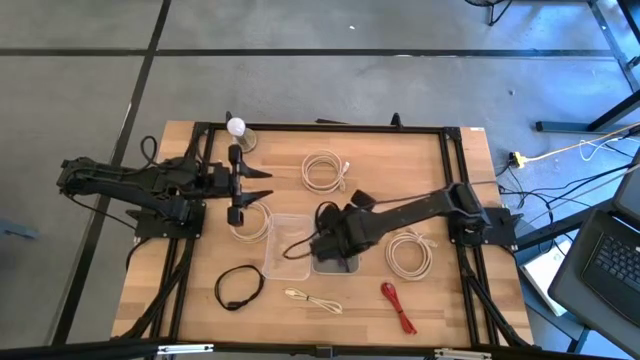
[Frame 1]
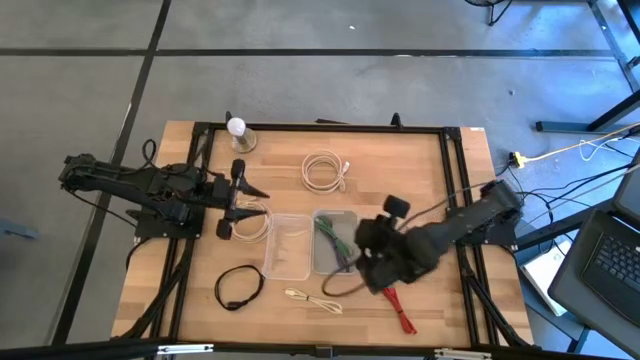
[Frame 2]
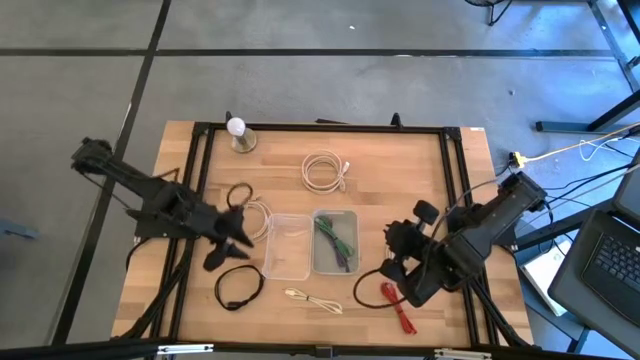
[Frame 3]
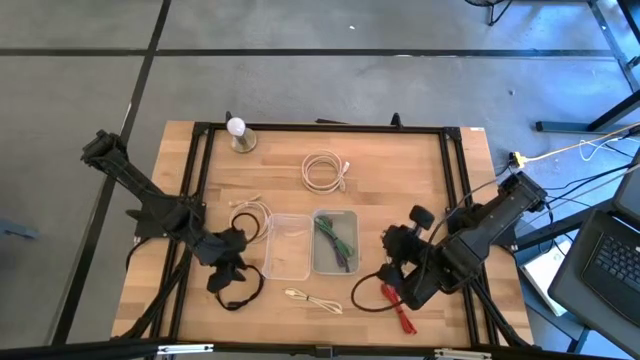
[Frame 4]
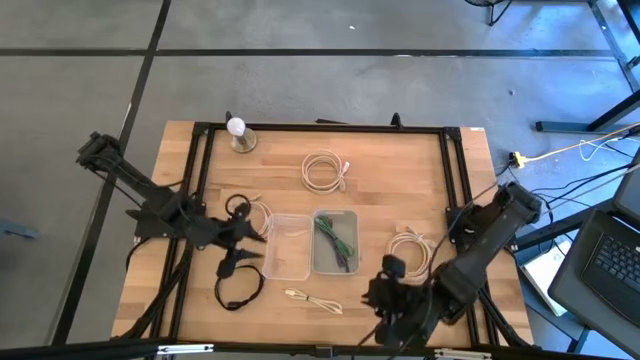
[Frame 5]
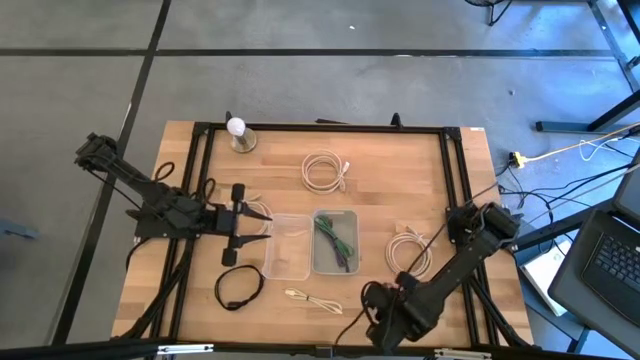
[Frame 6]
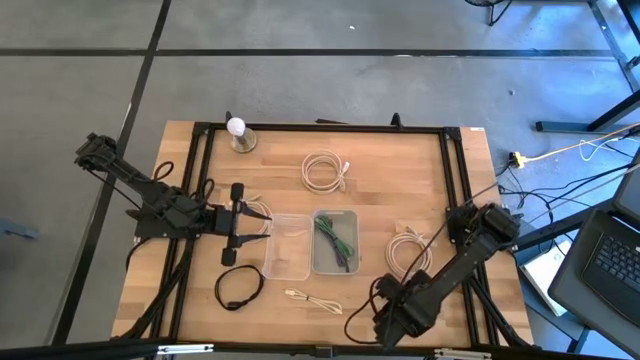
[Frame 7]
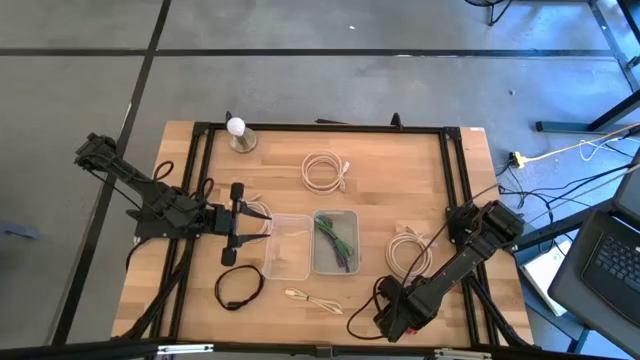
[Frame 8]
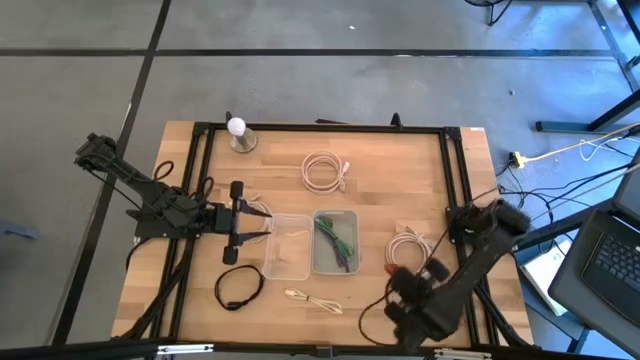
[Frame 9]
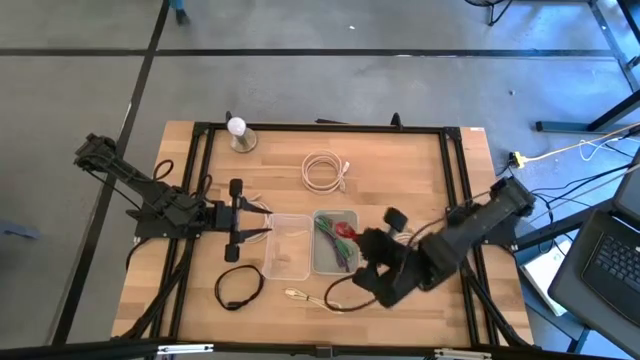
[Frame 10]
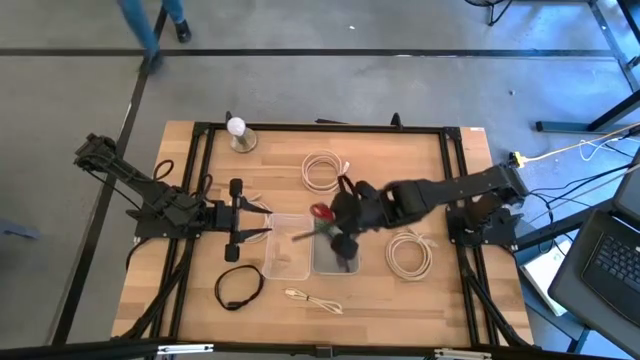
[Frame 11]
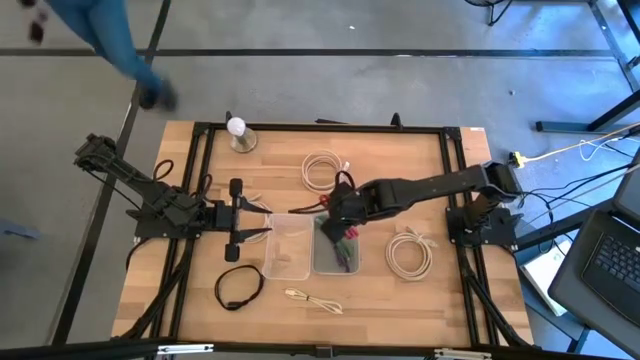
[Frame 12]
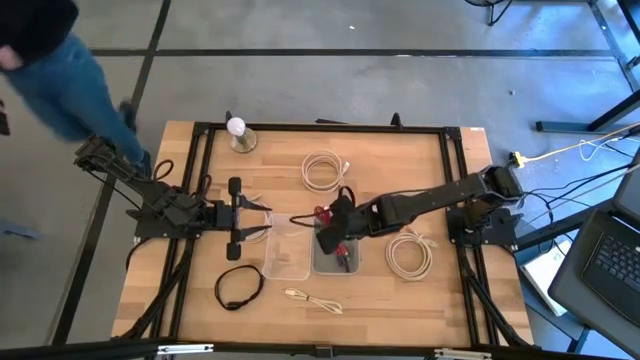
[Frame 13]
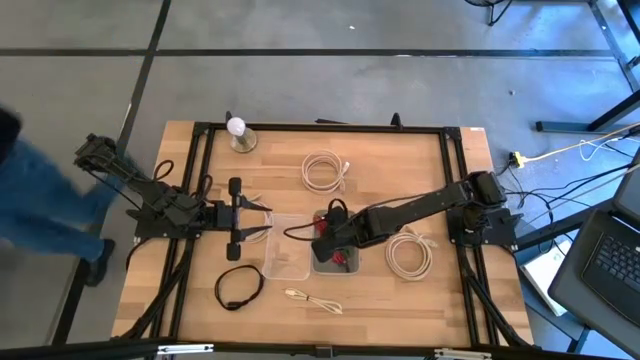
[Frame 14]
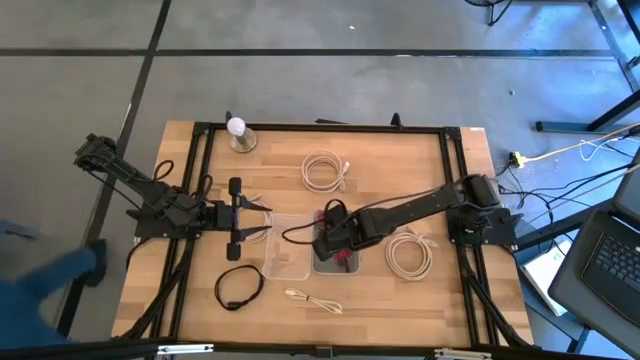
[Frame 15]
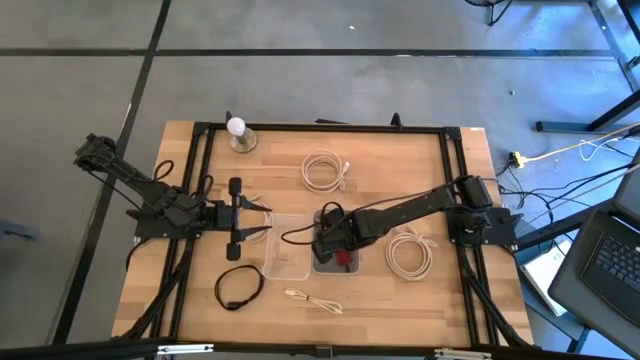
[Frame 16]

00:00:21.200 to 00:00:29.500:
Put the red charger cable into the gray bin

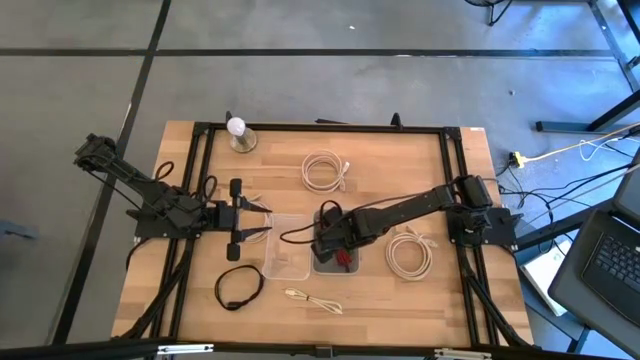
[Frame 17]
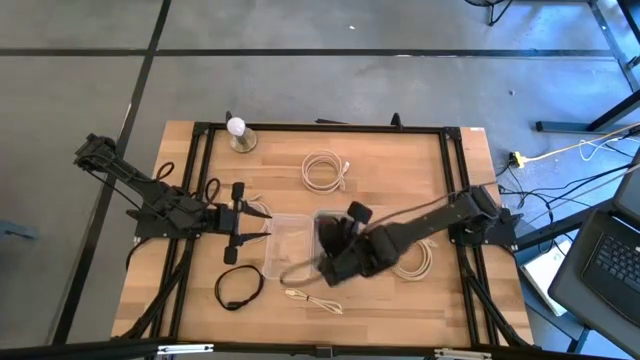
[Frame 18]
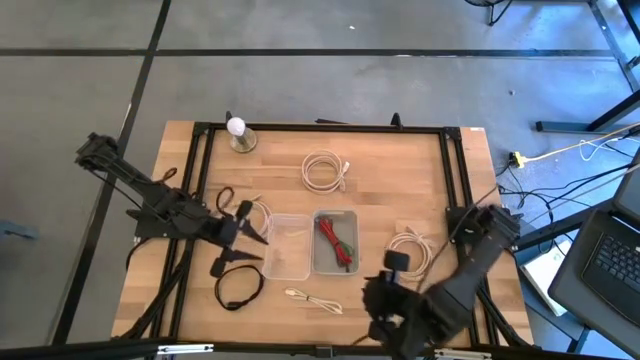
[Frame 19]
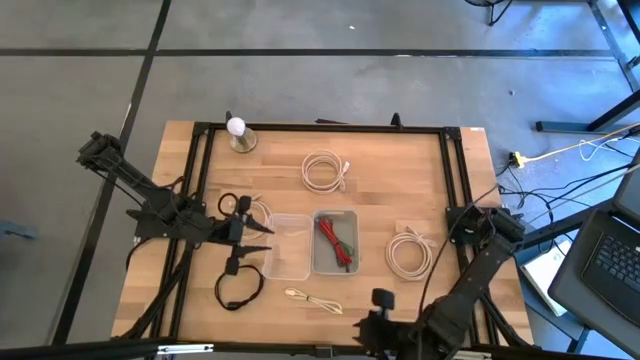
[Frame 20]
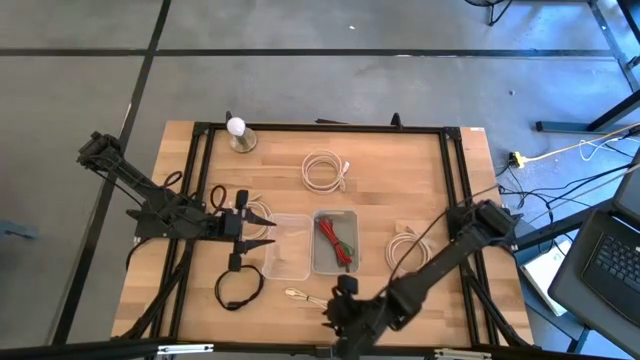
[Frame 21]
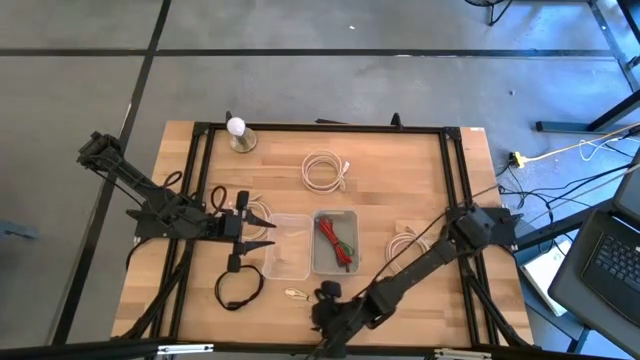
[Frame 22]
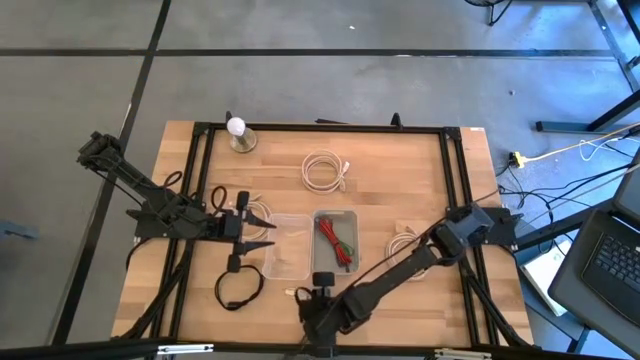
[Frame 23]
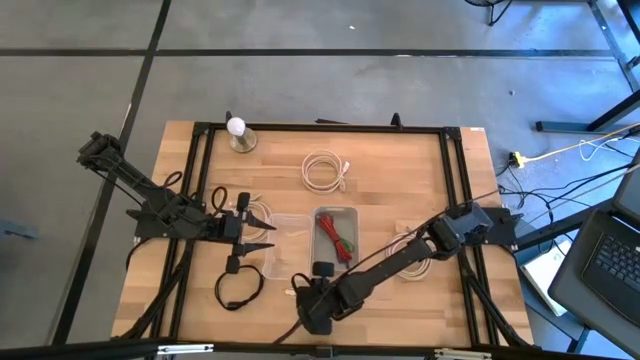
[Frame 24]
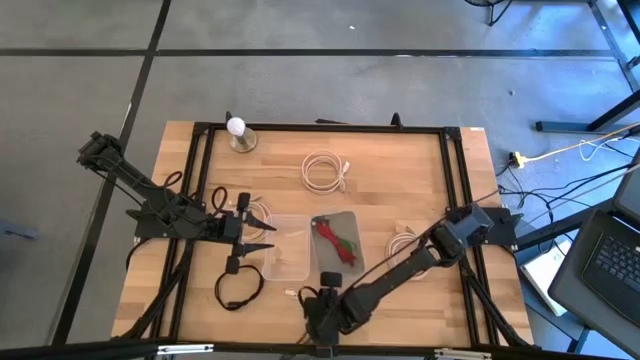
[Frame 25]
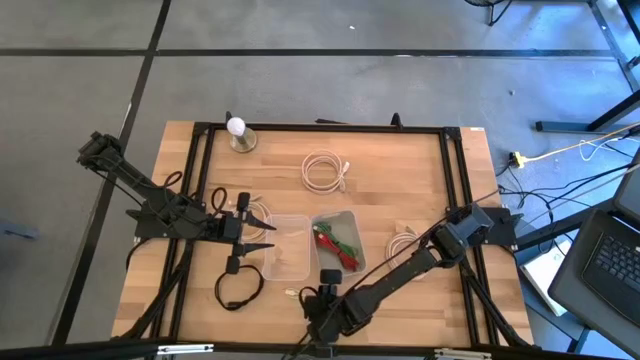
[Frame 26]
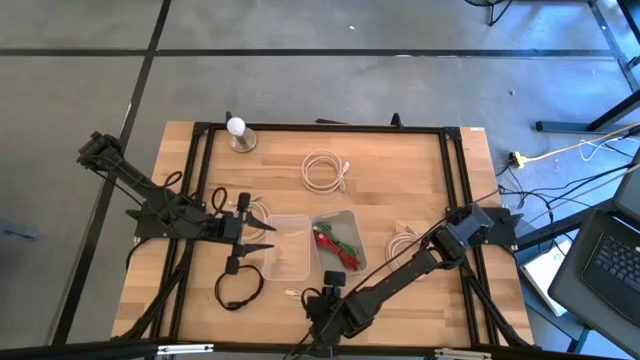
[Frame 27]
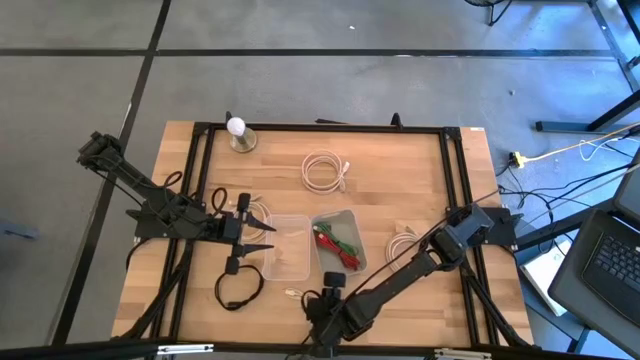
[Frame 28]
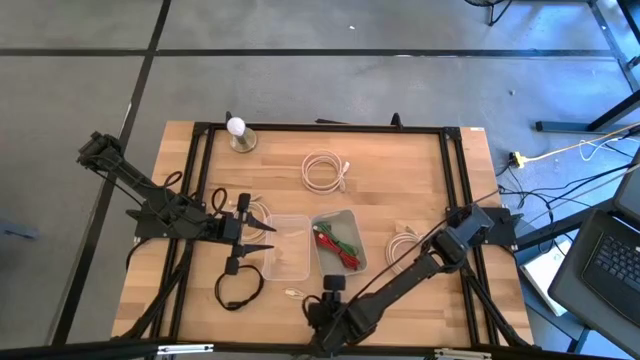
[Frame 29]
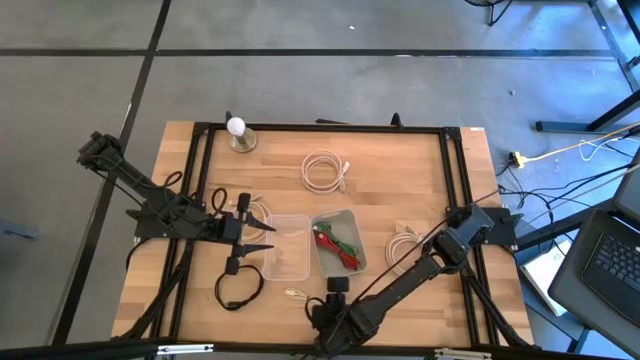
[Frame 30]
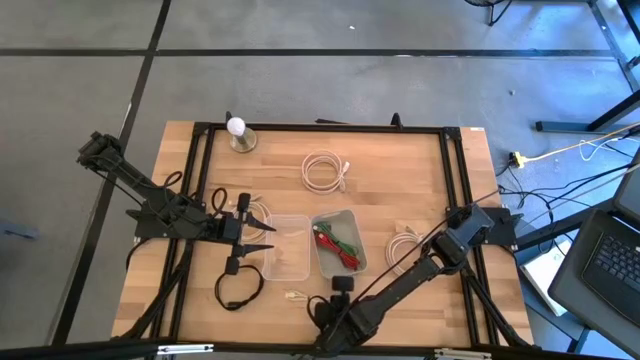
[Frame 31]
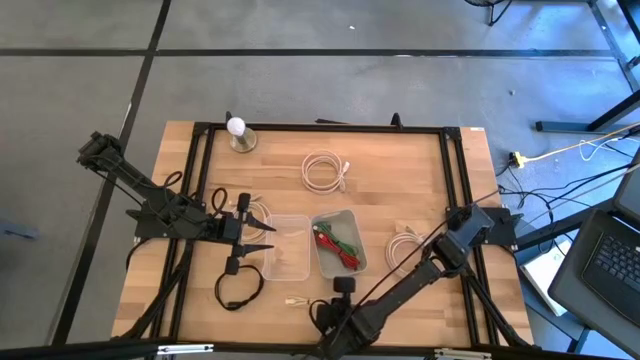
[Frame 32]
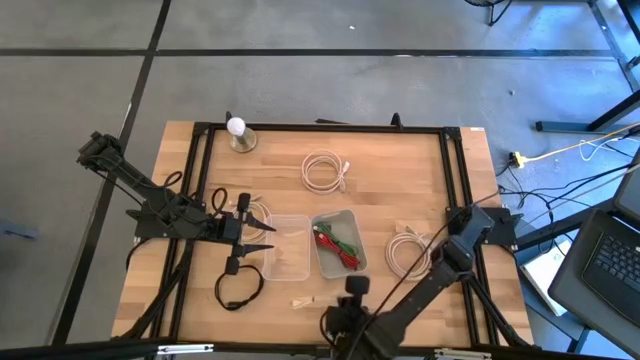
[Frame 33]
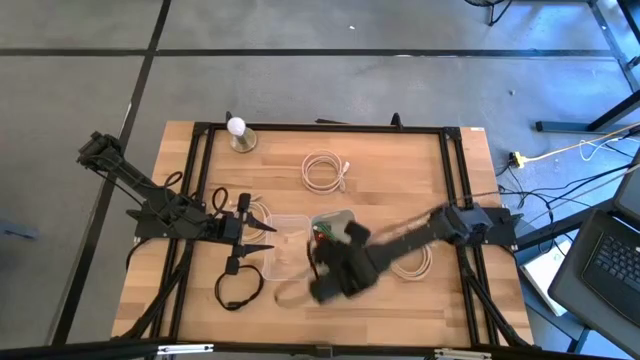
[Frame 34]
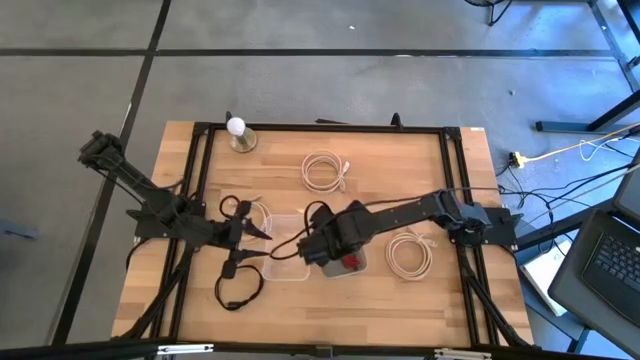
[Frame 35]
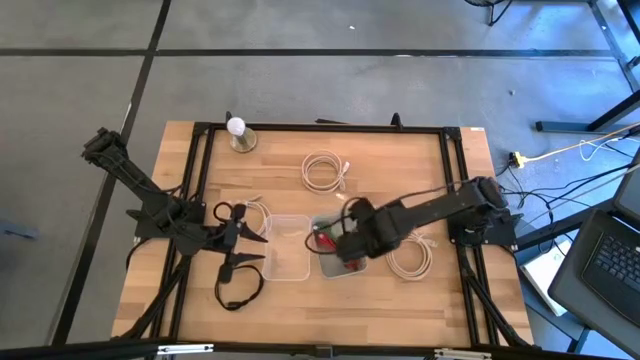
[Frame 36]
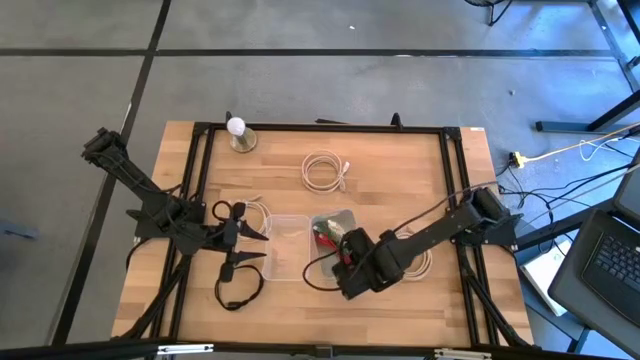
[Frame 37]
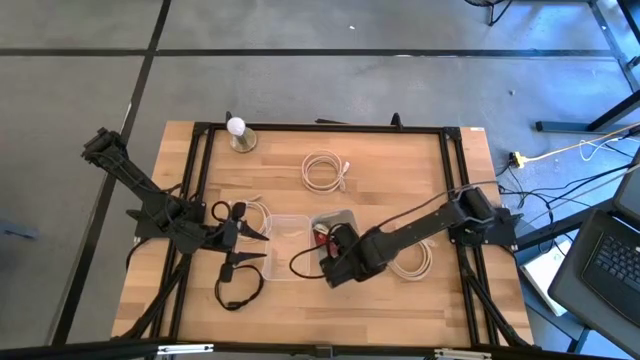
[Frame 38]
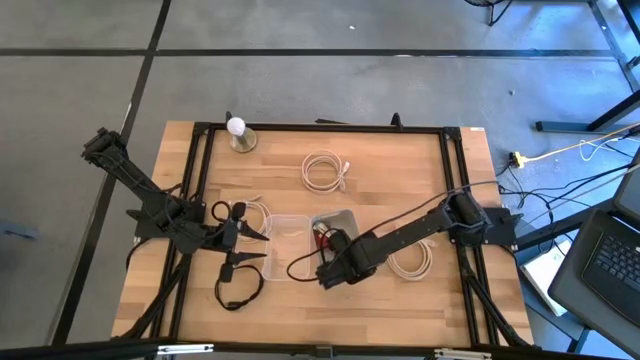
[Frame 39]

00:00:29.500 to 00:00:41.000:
Put the white charger cable into the gray bin
